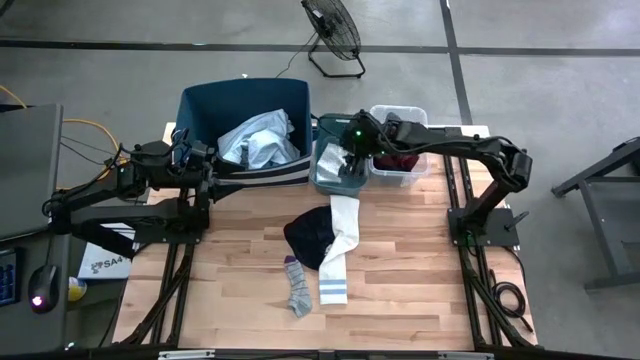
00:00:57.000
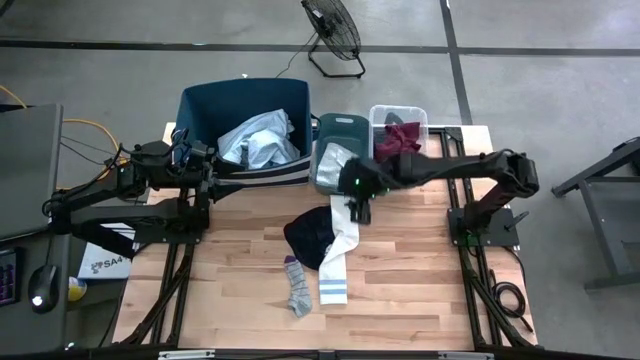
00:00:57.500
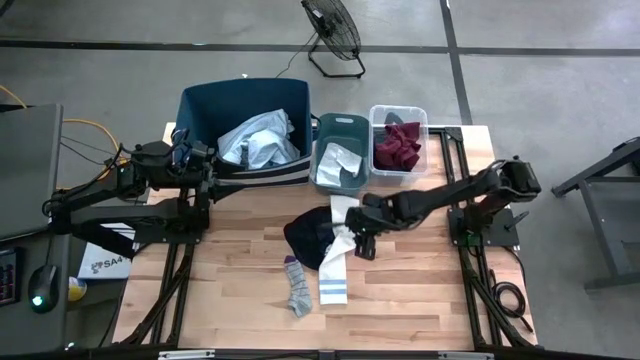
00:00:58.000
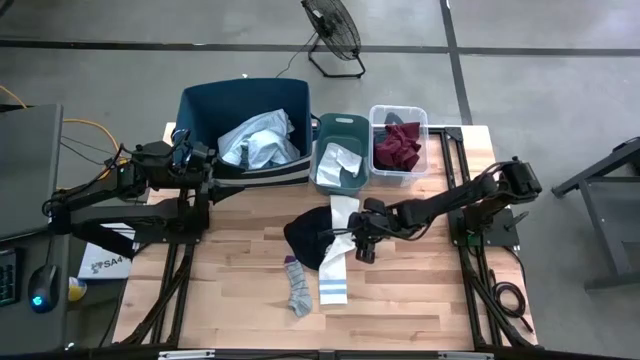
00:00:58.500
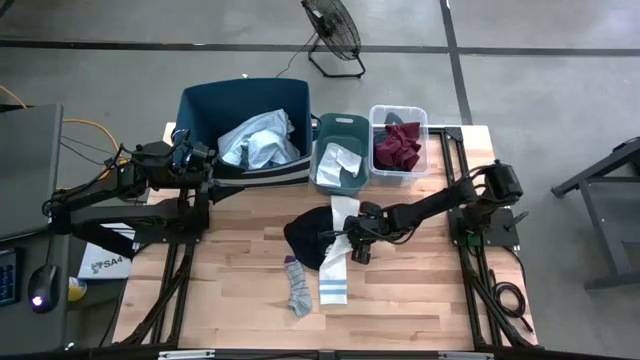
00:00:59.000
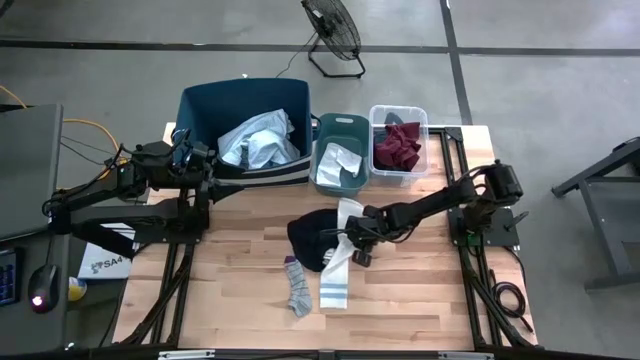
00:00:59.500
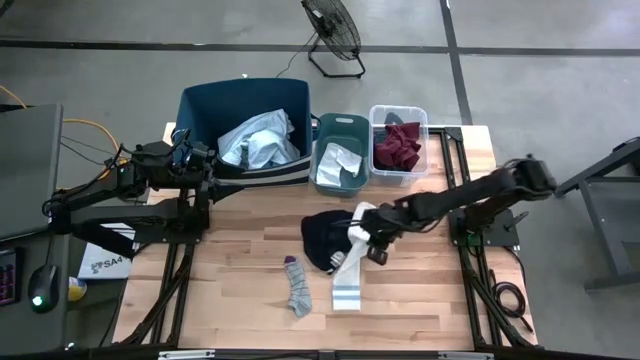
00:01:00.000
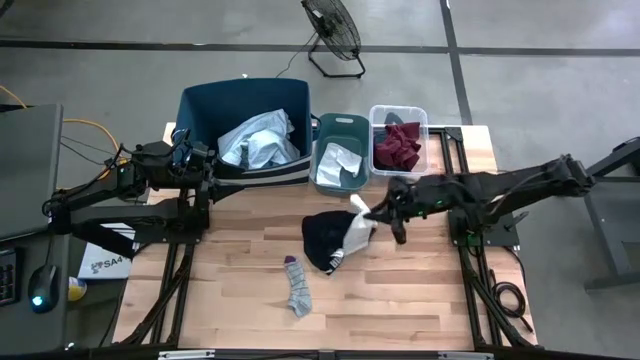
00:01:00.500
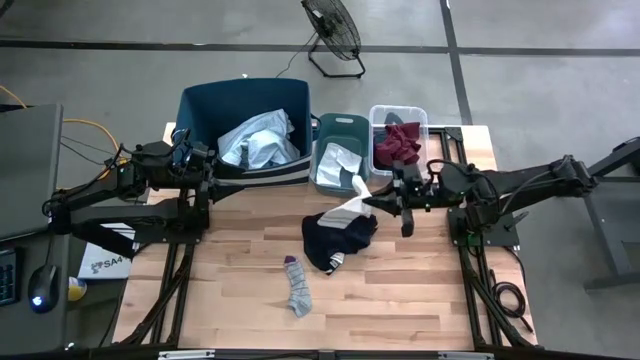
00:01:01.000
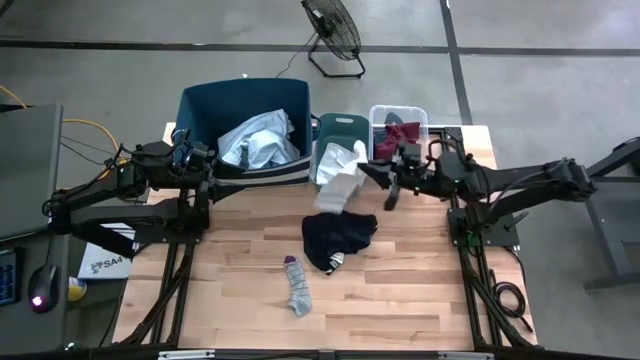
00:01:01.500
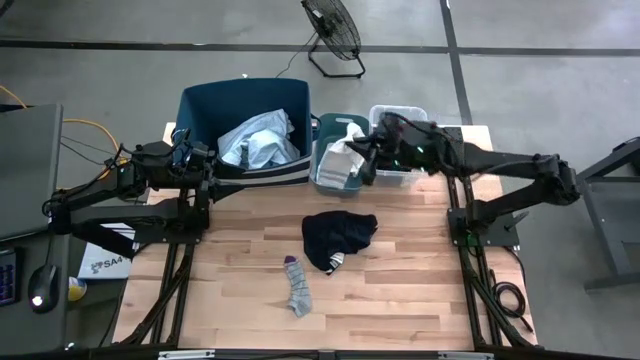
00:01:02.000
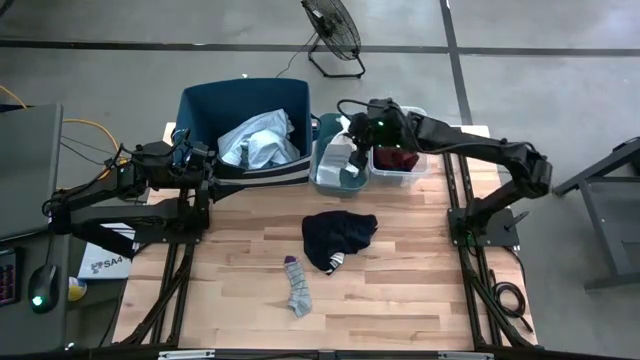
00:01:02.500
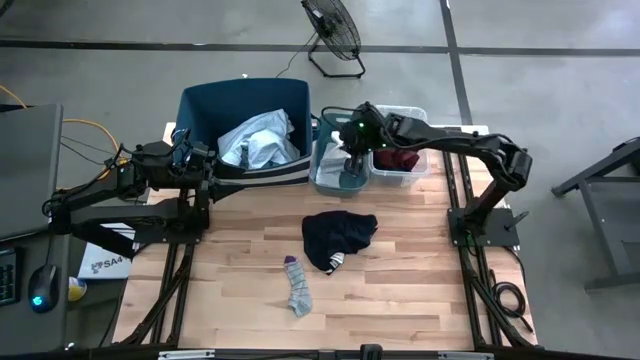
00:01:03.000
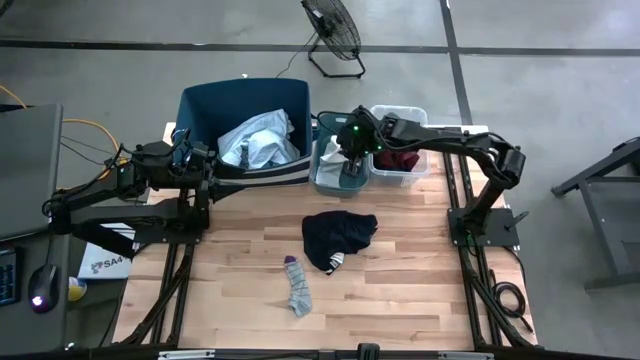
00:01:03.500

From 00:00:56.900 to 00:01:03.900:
Task: Pick & Place Cloths
Put the white sock into the blue bin

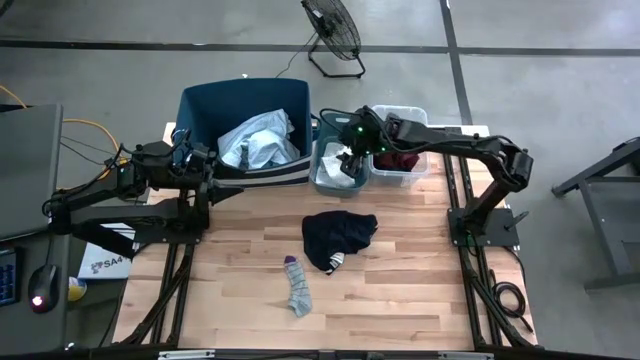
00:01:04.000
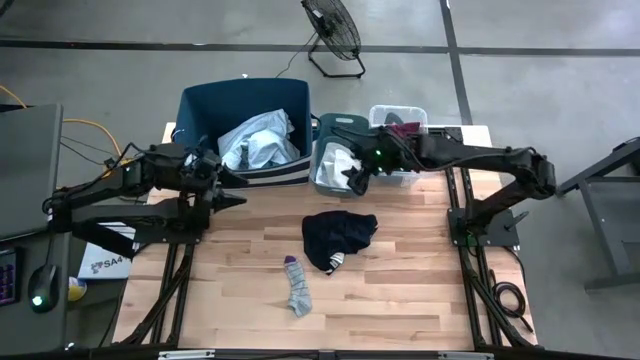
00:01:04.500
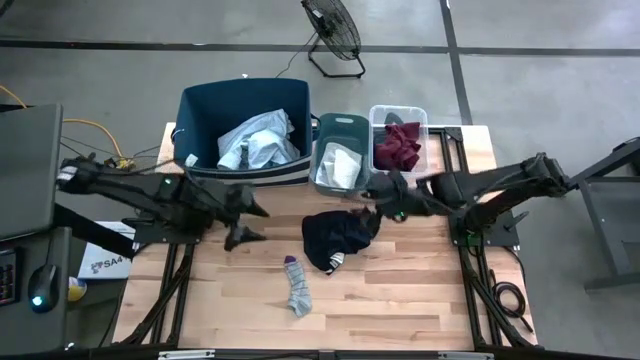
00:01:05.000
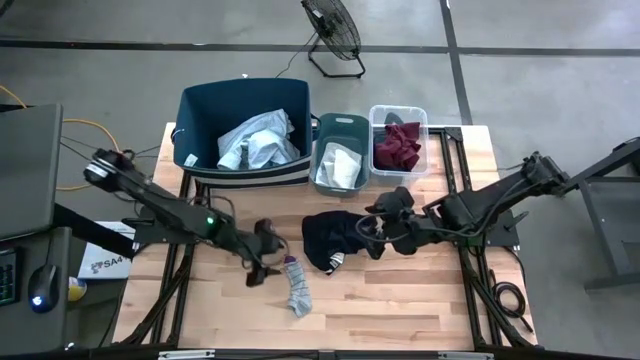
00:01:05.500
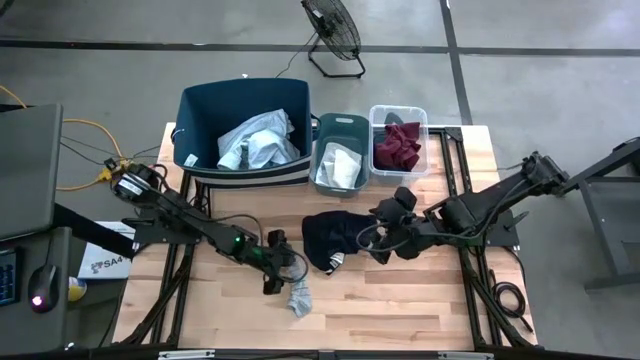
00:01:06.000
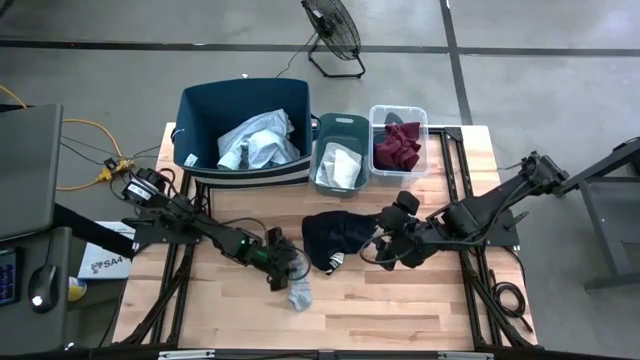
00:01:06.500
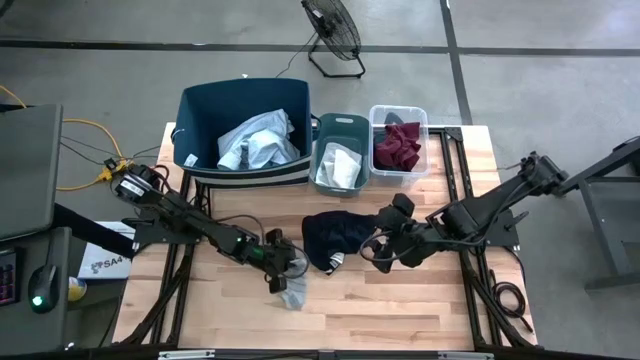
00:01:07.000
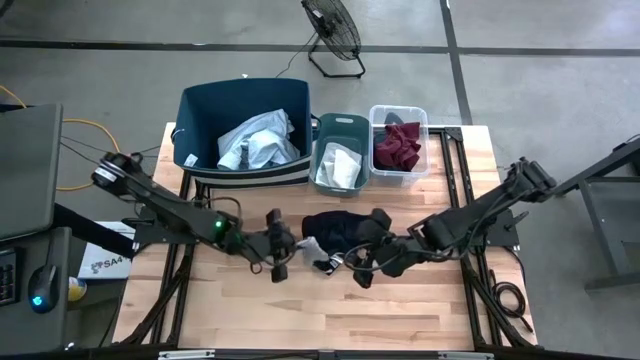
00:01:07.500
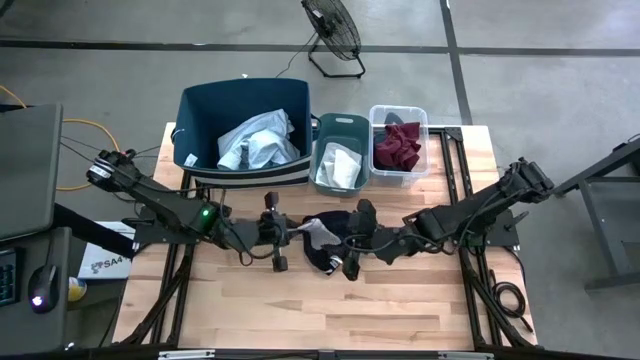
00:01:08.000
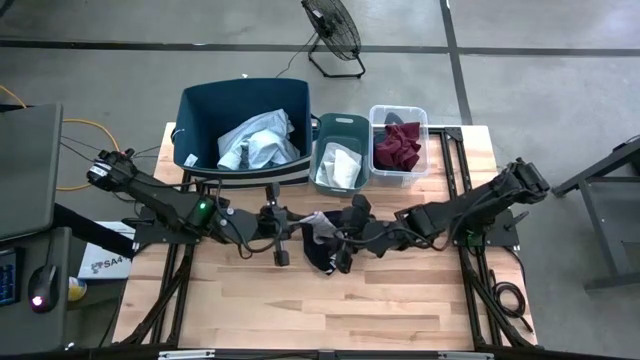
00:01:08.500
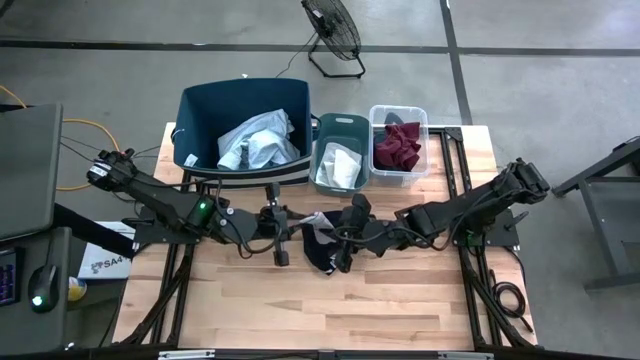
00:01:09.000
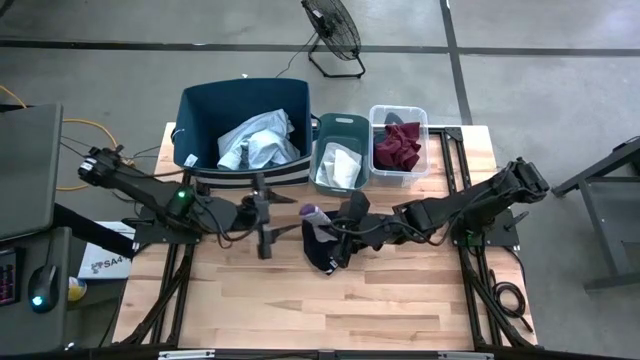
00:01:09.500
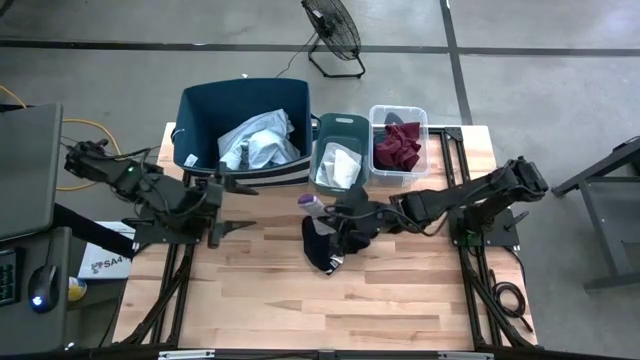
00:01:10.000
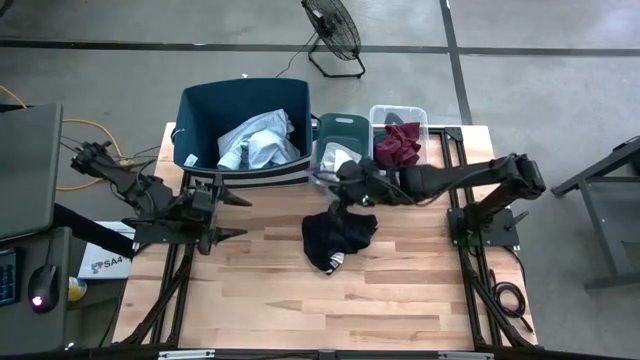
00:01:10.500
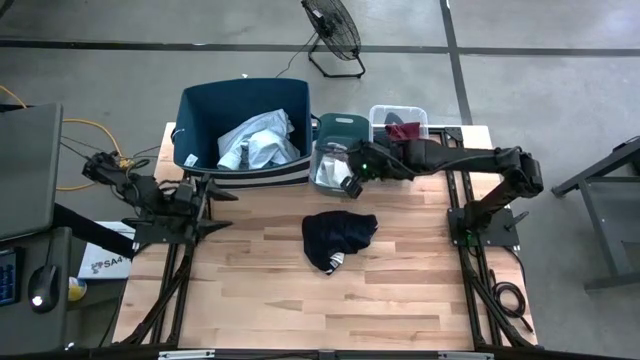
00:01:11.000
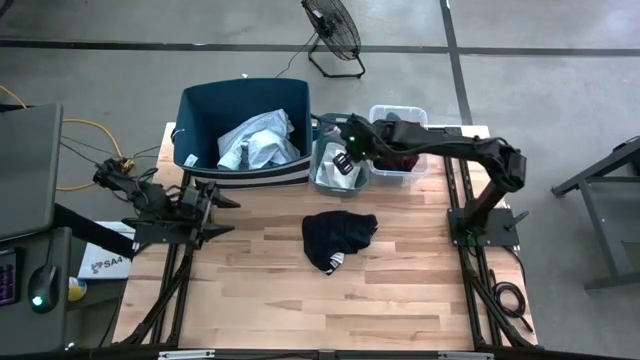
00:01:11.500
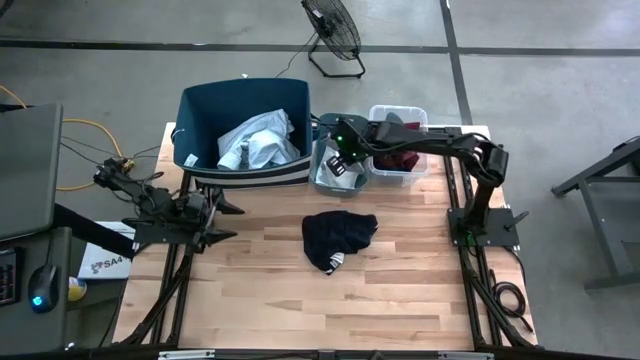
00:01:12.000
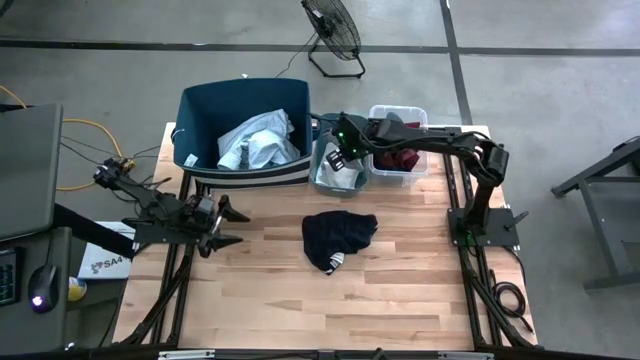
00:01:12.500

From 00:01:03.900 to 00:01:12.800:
Put the gray sock into the blue bin

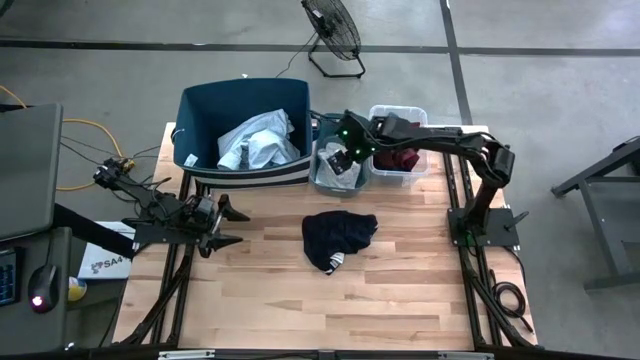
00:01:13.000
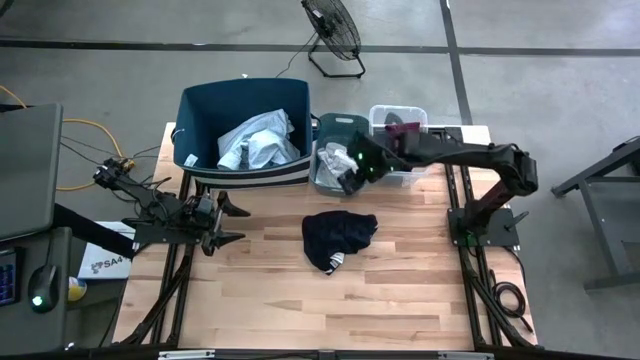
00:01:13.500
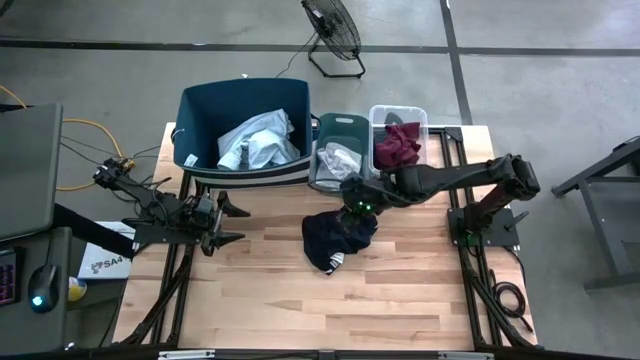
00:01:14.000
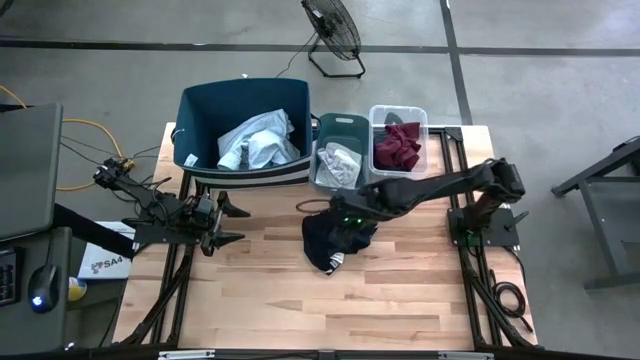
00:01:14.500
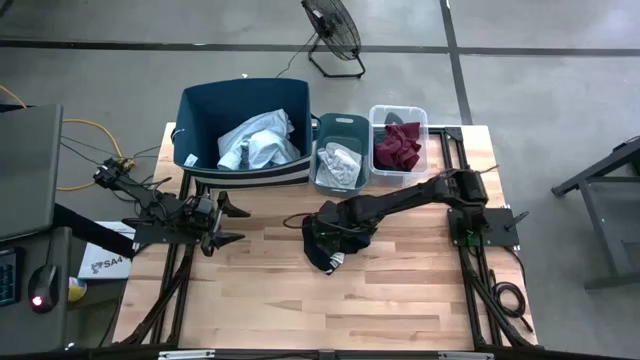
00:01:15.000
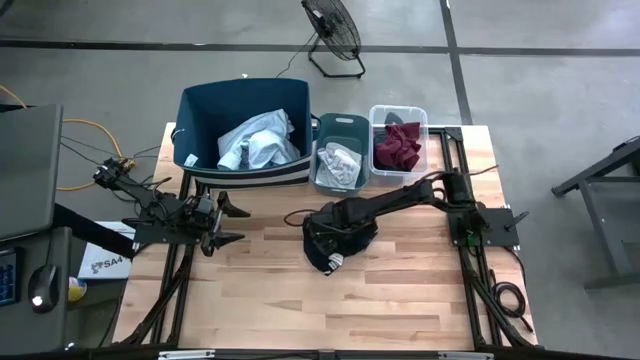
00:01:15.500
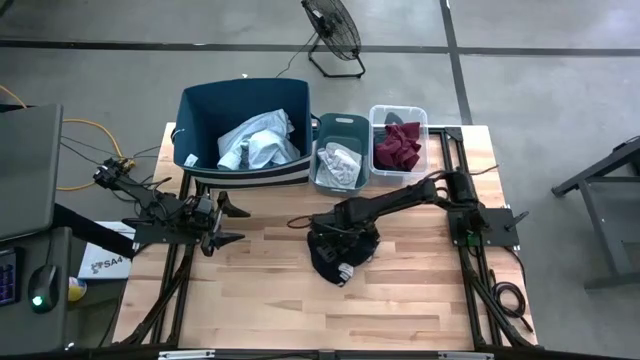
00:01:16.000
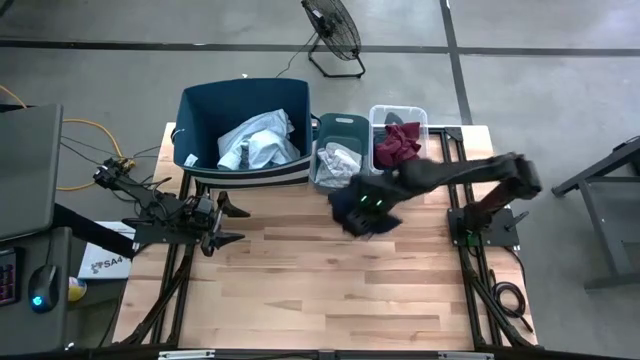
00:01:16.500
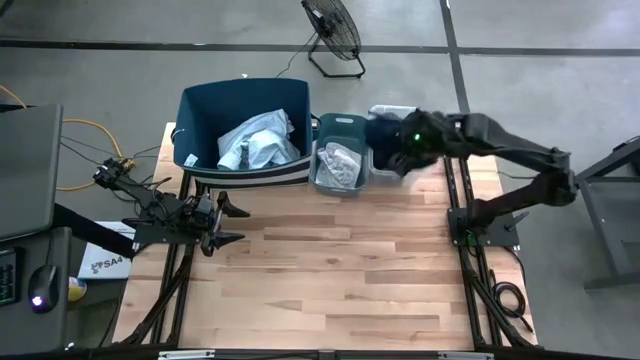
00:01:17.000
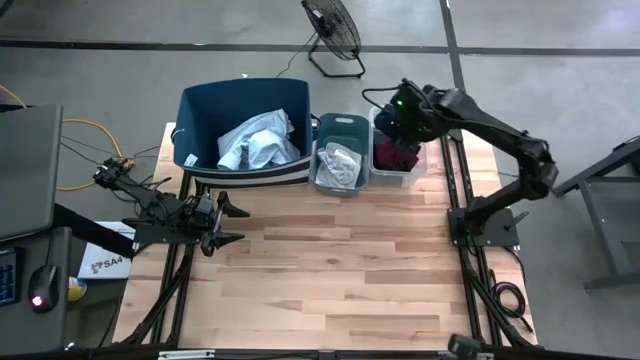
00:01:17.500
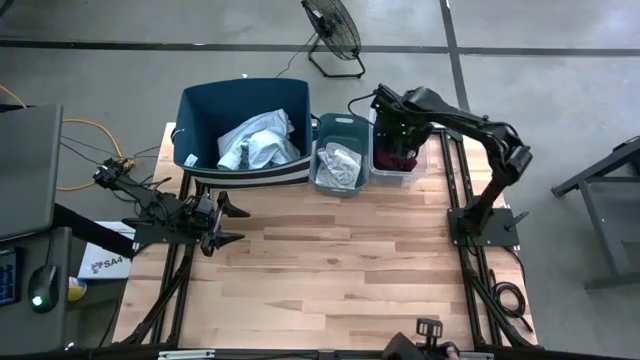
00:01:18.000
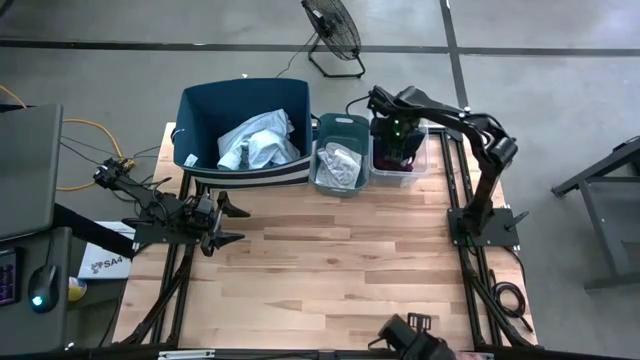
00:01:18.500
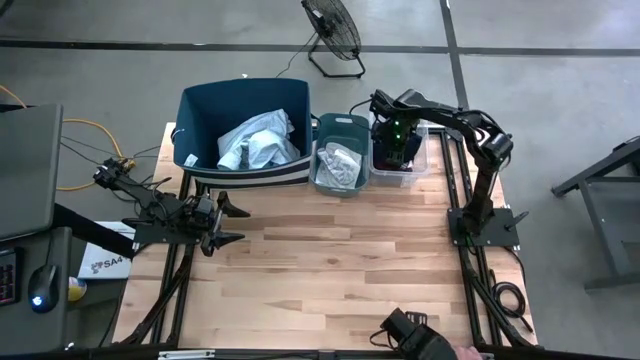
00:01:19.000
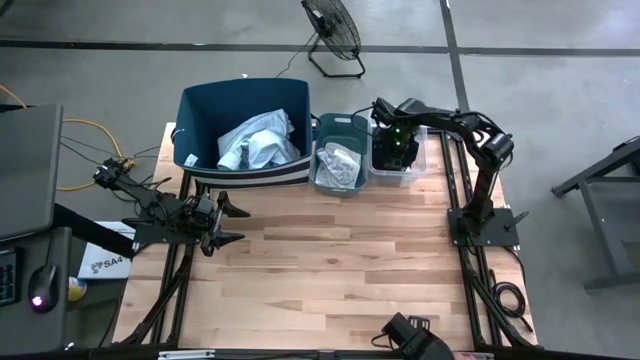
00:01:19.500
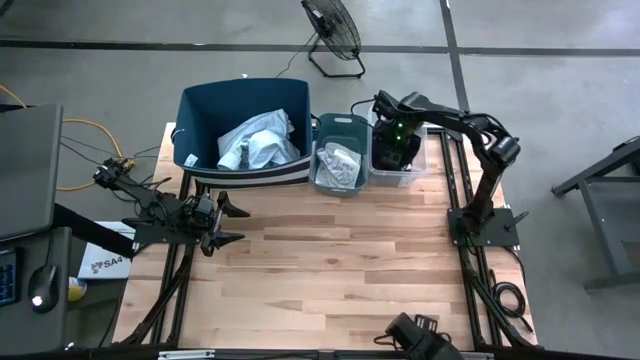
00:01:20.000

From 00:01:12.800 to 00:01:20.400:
Put the dark blue underwear into the transparent bin
